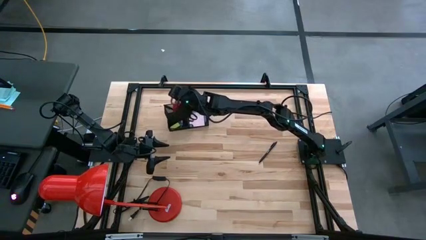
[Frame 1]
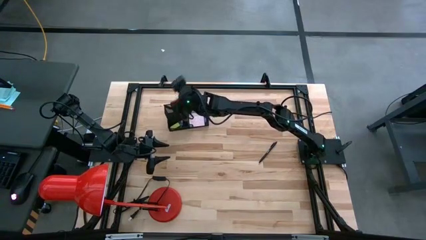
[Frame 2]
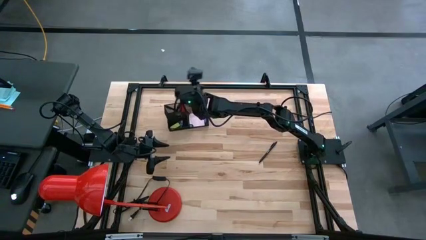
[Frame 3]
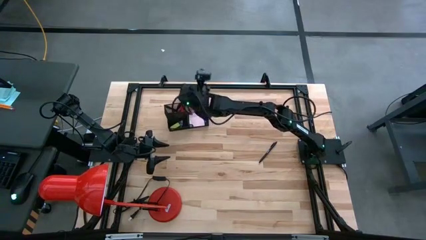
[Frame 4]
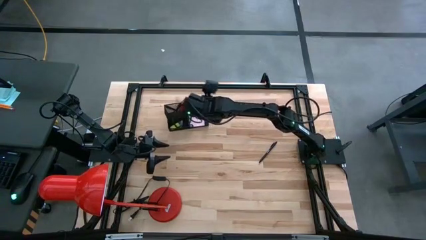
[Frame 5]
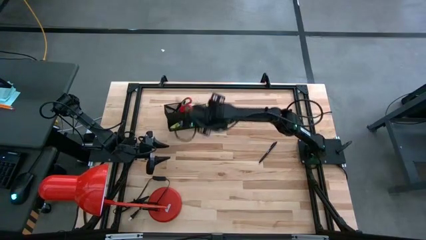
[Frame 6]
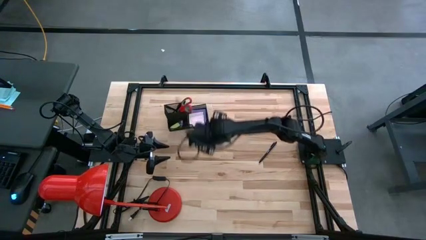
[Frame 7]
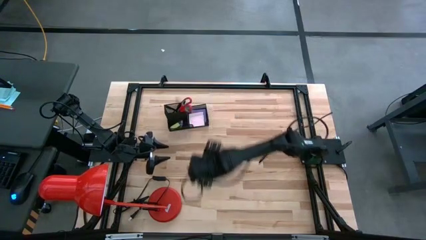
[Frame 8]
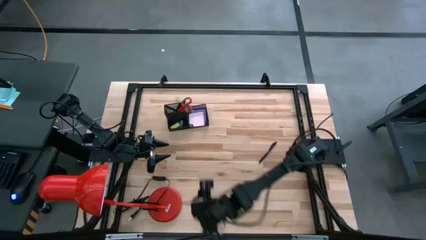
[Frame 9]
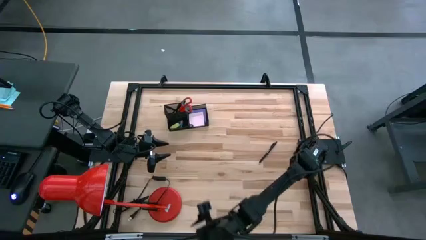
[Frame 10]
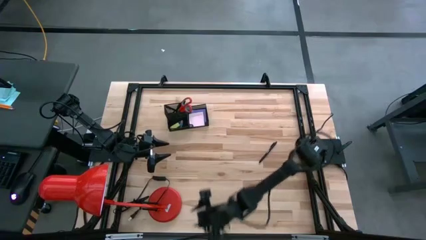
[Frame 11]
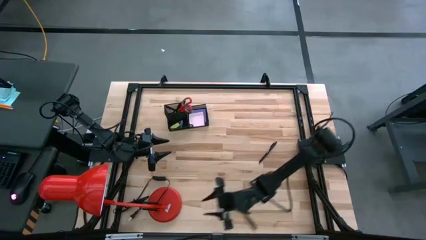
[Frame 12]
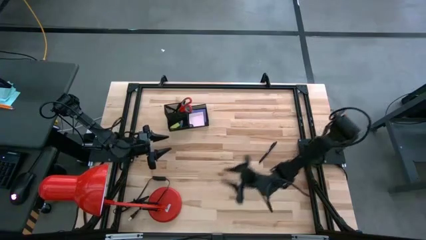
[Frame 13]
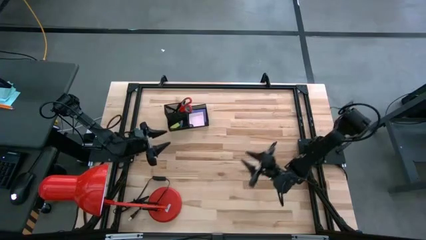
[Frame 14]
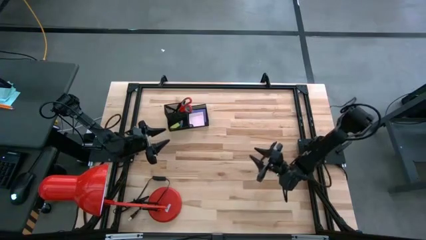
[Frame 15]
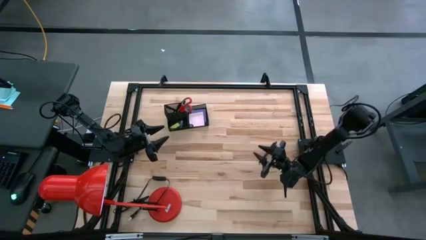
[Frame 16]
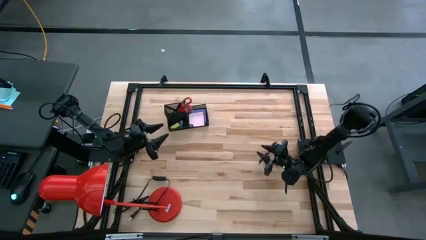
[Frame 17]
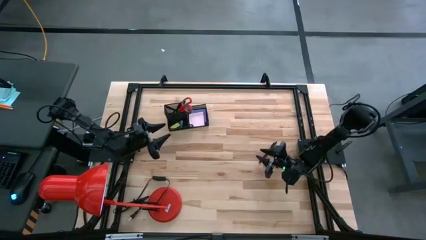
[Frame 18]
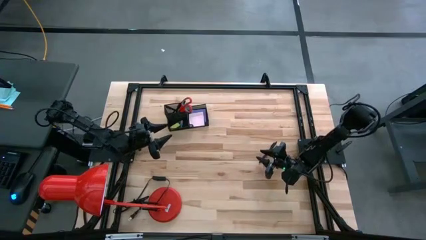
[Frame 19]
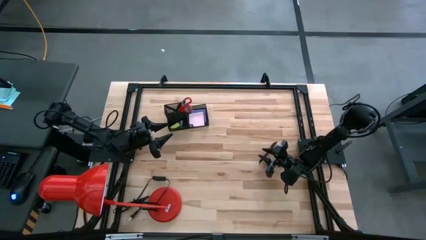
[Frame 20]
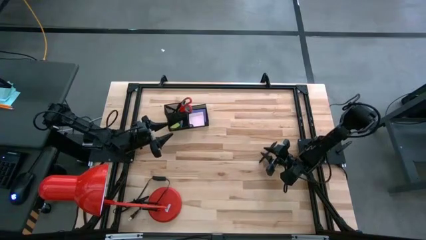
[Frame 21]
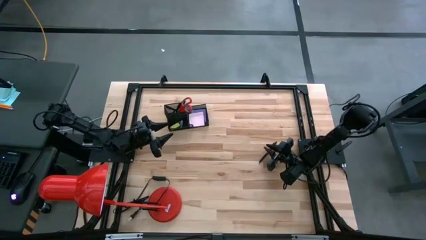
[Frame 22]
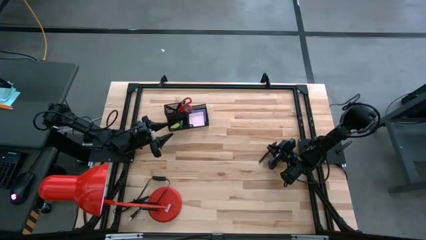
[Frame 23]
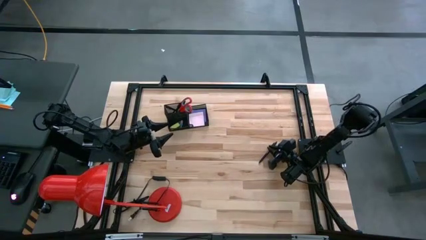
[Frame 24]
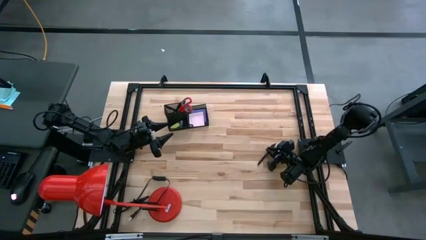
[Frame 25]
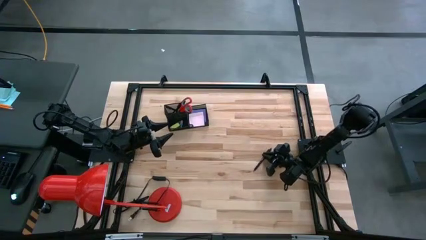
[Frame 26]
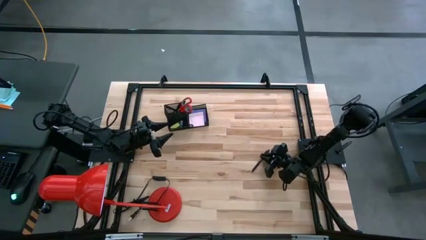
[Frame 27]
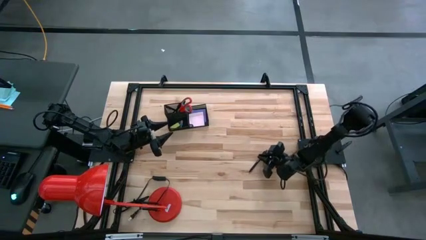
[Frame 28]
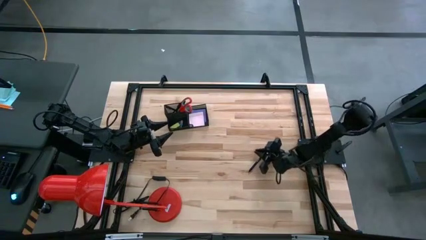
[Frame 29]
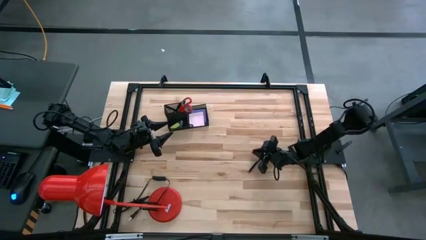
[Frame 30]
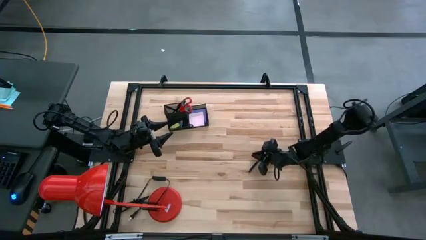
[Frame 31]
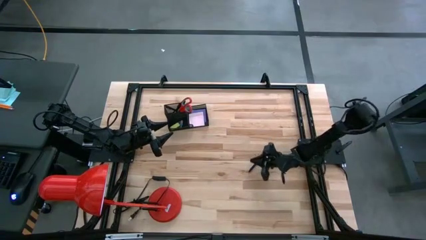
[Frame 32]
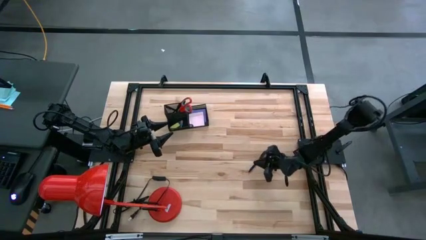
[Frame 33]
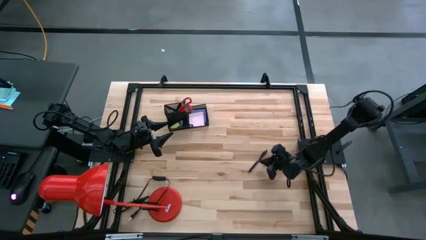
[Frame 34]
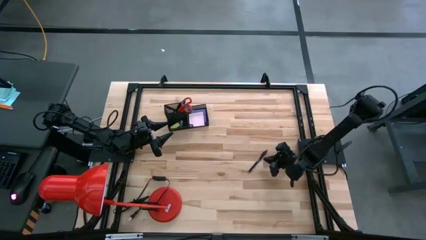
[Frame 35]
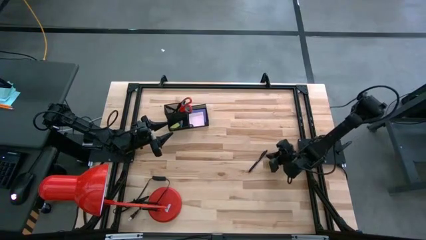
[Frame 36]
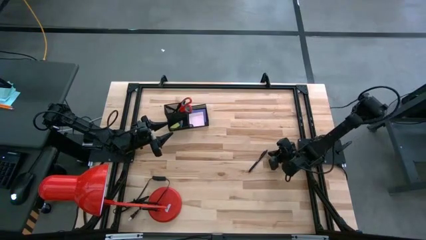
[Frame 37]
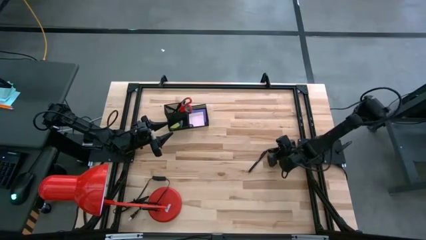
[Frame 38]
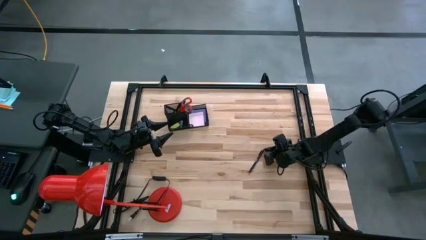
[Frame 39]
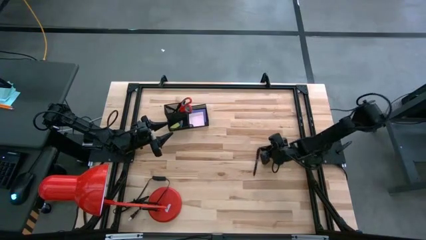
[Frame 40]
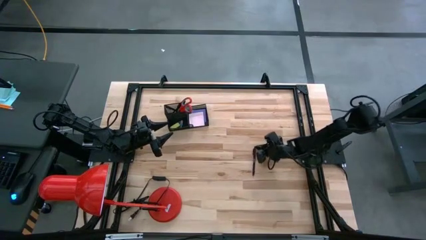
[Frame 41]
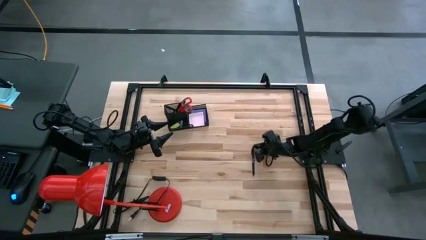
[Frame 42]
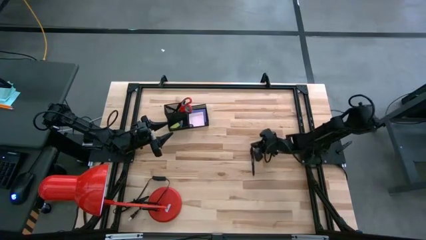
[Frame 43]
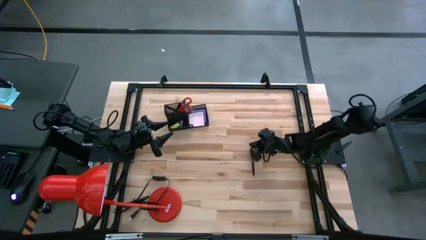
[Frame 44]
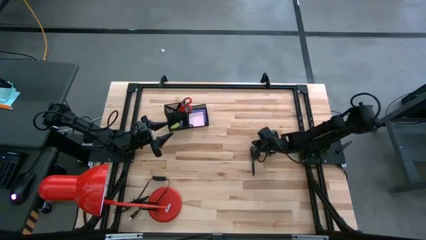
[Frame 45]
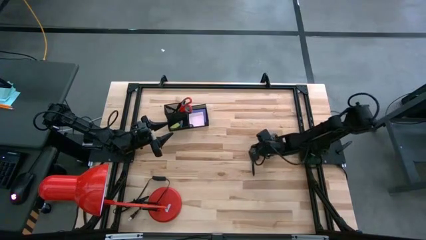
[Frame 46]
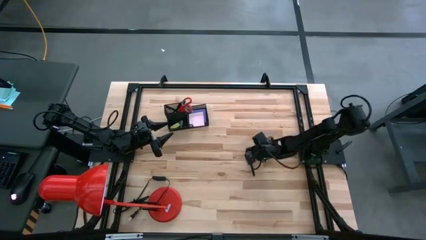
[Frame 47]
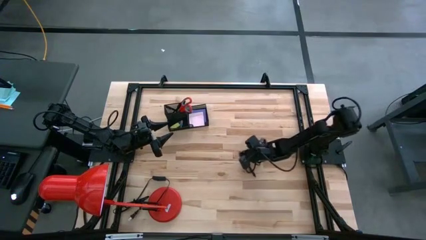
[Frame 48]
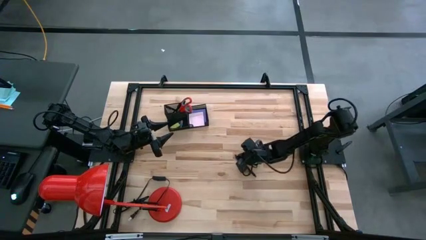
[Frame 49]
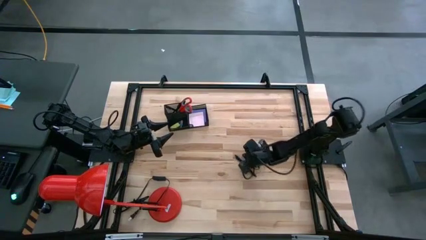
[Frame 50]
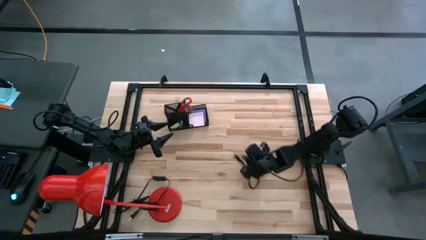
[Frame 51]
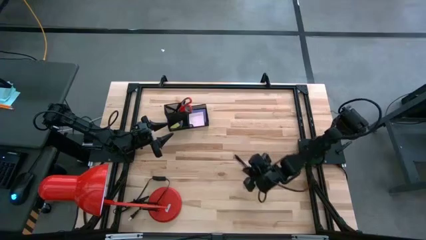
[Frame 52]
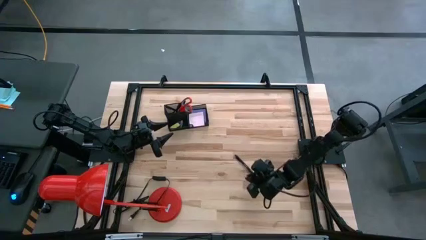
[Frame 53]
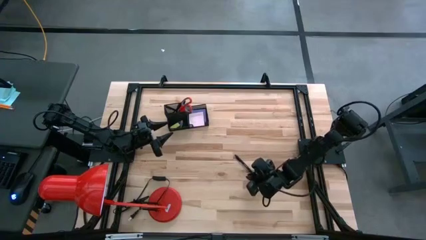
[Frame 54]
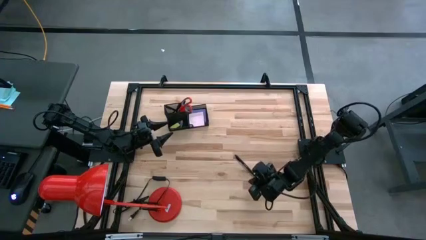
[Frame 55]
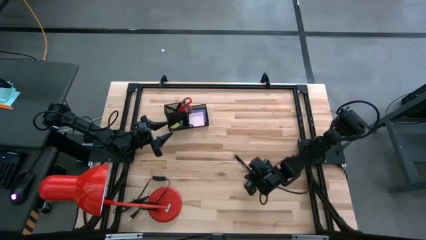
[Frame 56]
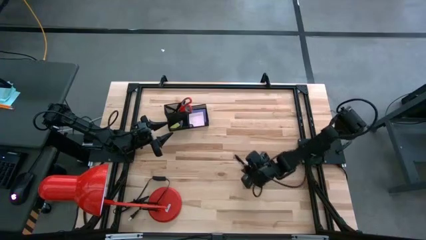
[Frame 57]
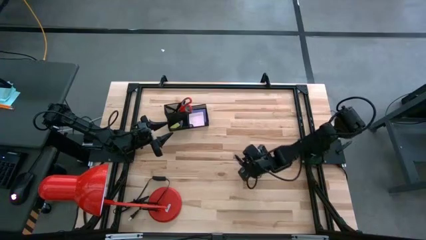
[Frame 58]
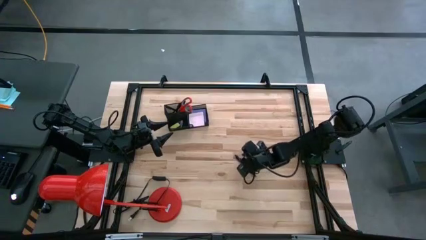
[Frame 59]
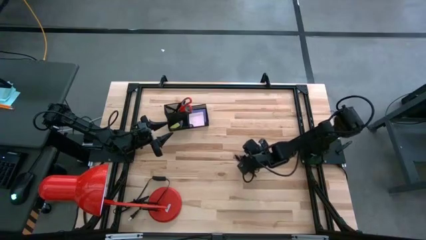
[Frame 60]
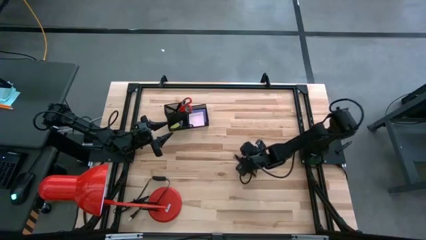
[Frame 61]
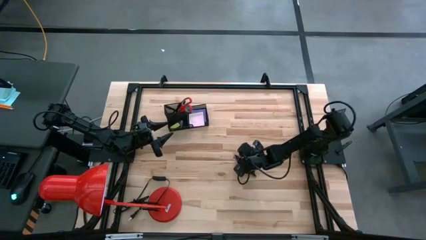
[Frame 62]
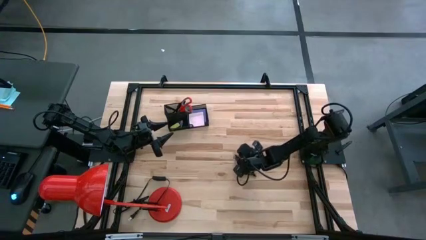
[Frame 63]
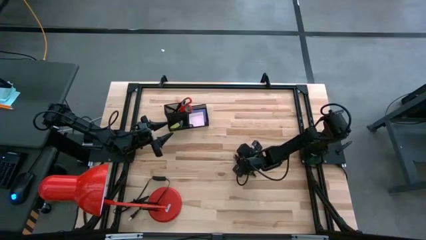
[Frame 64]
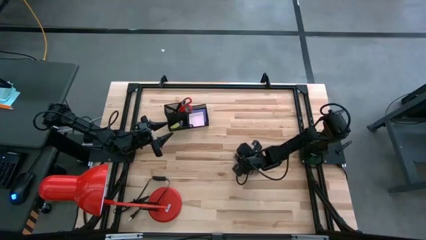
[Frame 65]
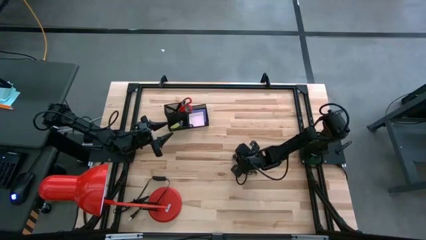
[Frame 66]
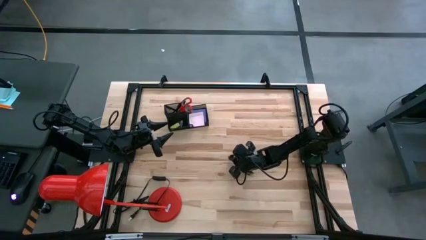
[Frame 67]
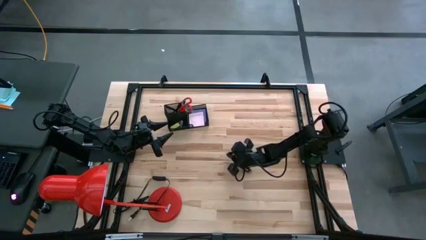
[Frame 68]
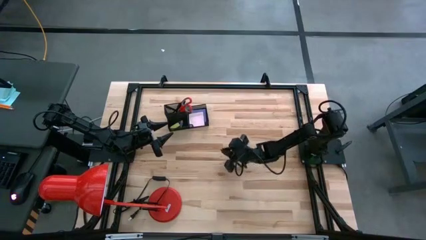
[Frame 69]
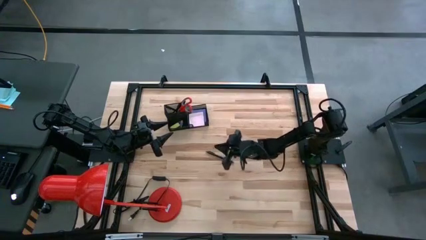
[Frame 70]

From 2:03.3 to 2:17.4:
Task: Pick and place office supplies into organizer
Put the black pen into the desk organizer

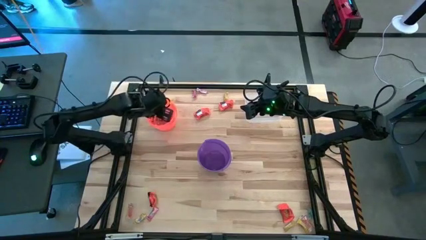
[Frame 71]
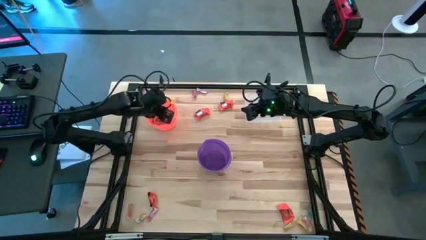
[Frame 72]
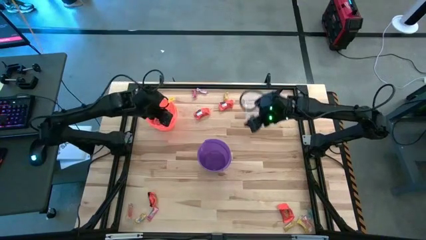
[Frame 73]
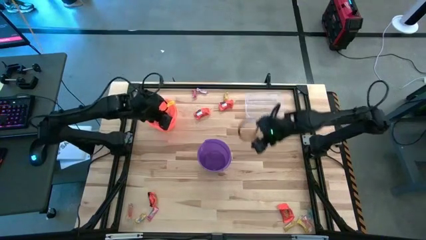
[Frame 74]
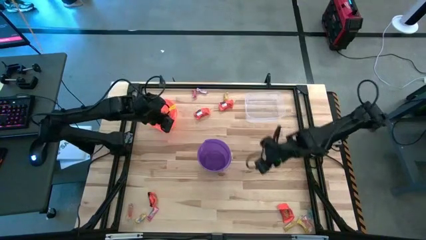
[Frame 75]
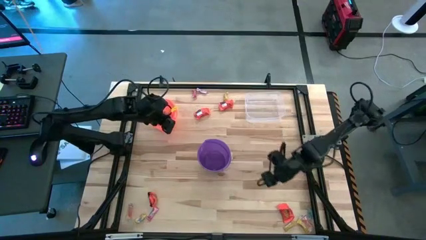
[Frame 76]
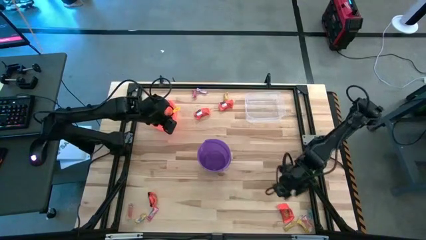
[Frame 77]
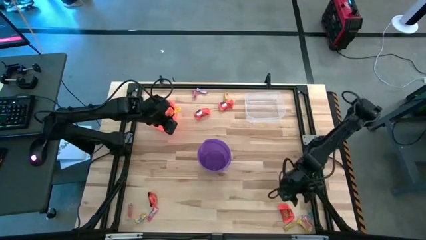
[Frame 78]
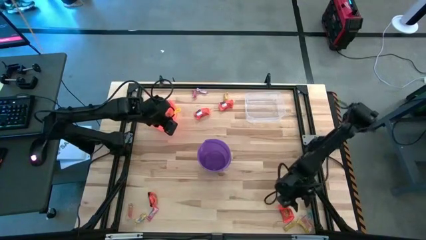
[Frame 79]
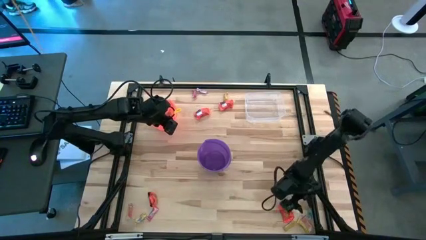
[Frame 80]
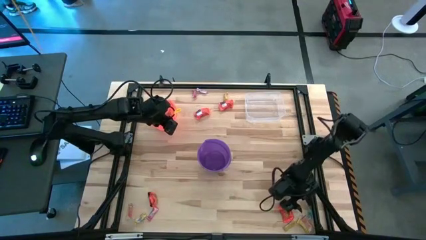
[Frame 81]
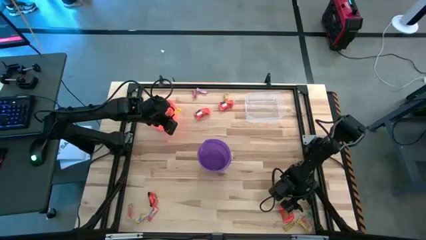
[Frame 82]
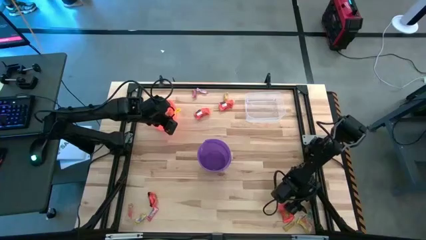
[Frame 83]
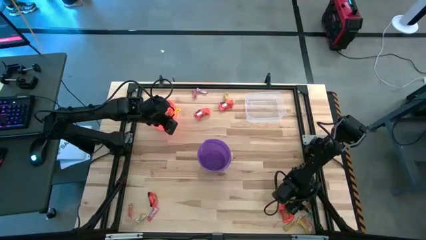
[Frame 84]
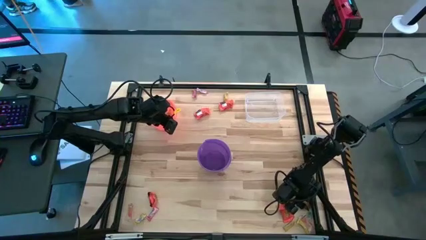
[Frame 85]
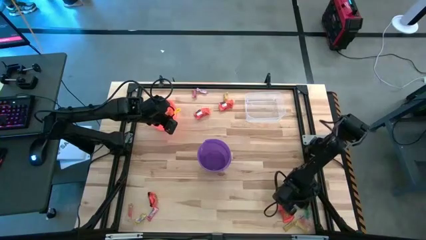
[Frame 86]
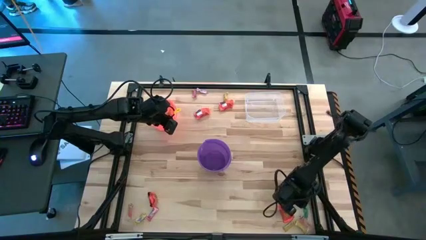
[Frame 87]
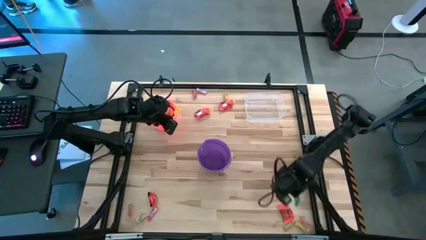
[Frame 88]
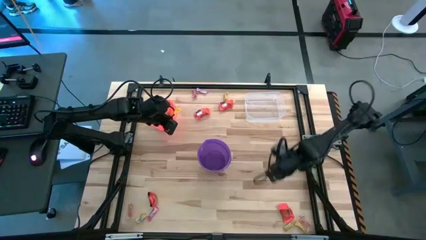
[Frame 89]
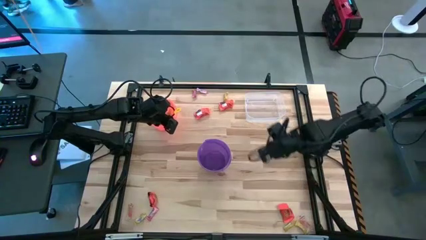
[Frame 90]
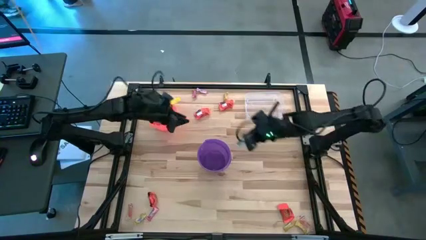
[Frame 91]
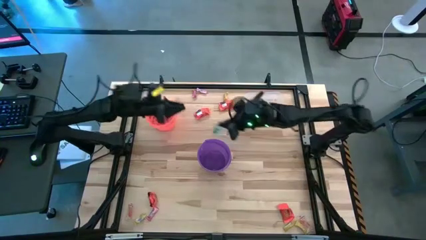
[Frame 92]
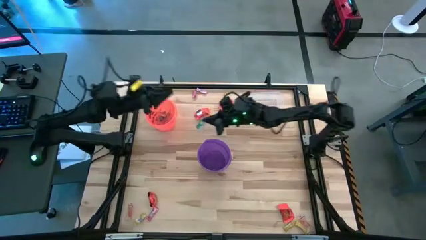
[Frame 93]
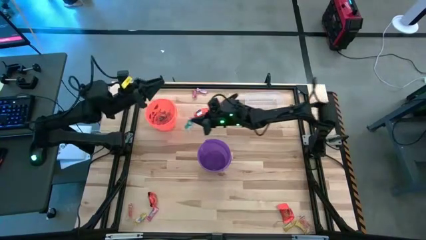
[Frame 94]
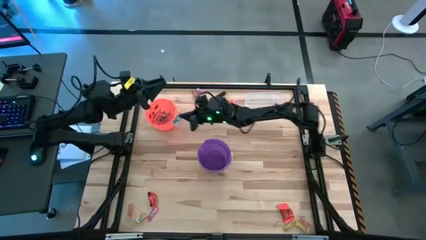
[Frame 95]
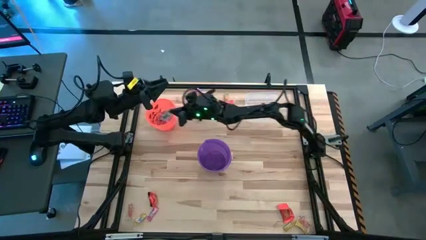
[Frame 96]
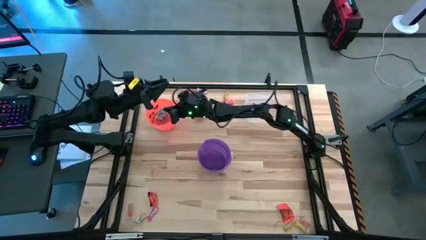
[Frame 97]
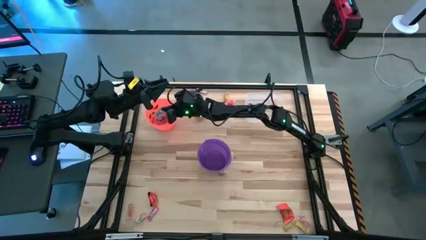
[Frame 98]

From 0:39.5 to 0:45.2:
Task: Sort candy by brand, put in halloween buckets
Put the blue gummy into the orange bucket
